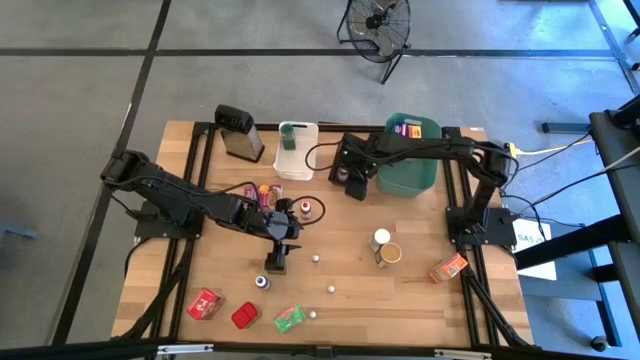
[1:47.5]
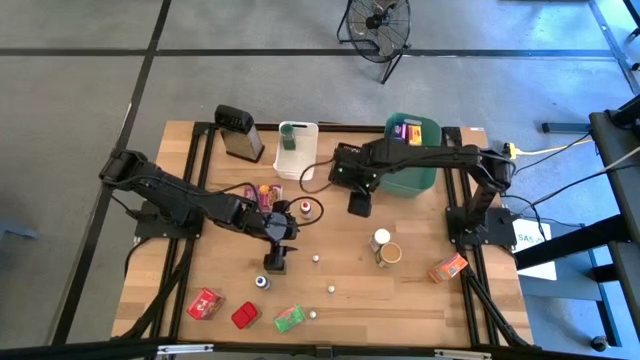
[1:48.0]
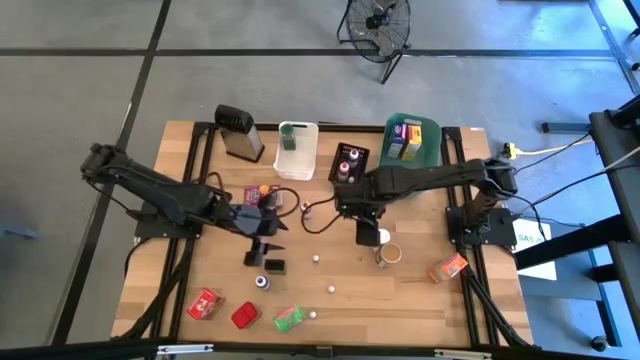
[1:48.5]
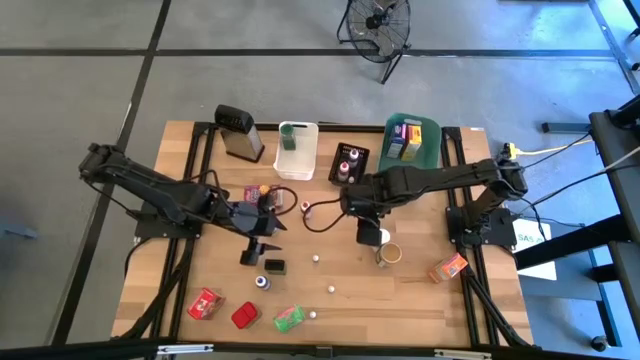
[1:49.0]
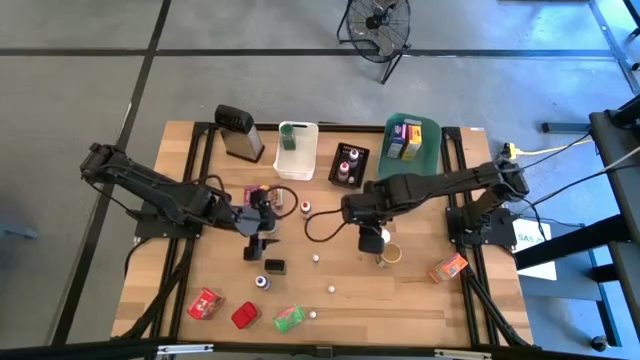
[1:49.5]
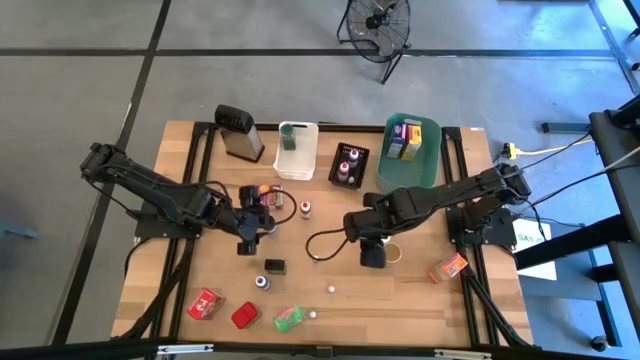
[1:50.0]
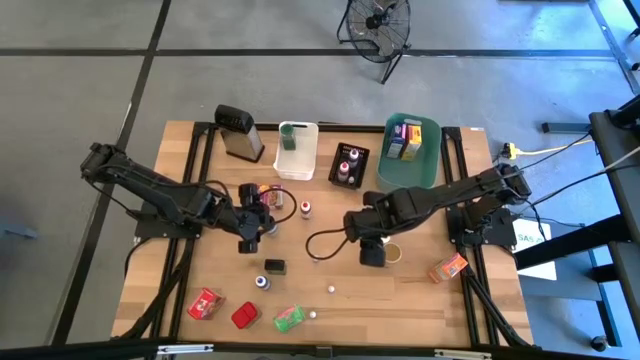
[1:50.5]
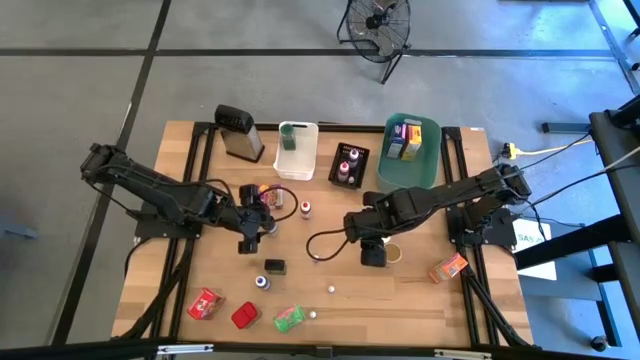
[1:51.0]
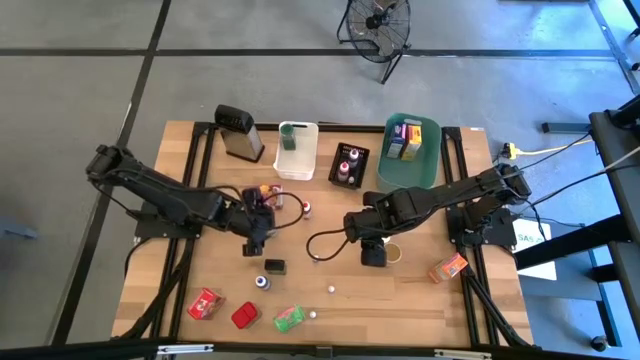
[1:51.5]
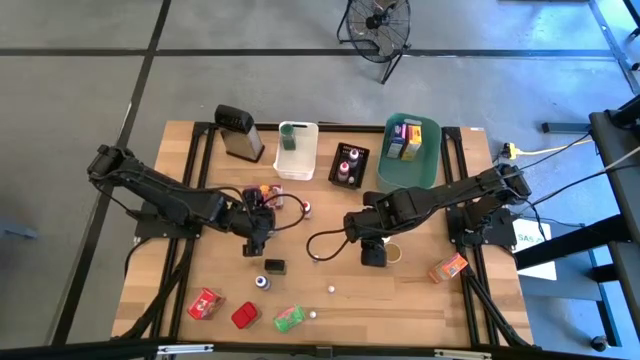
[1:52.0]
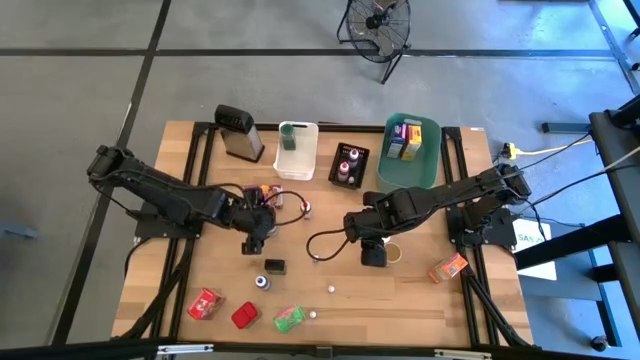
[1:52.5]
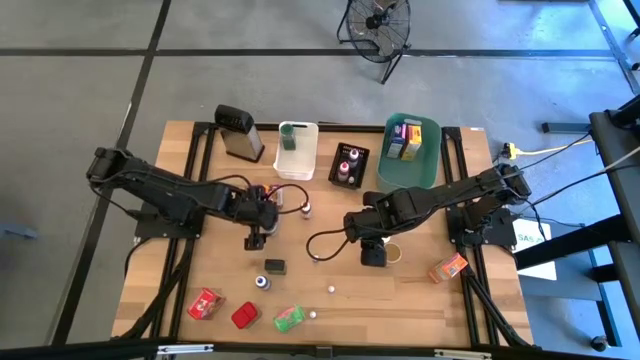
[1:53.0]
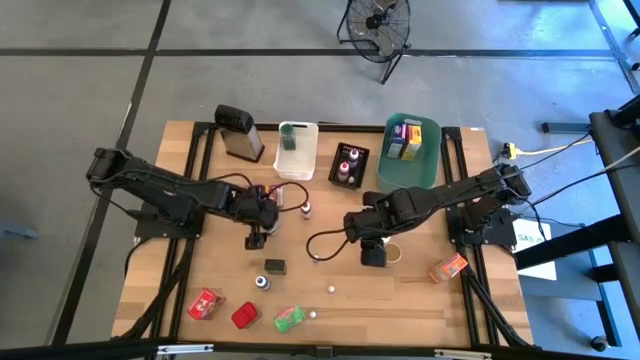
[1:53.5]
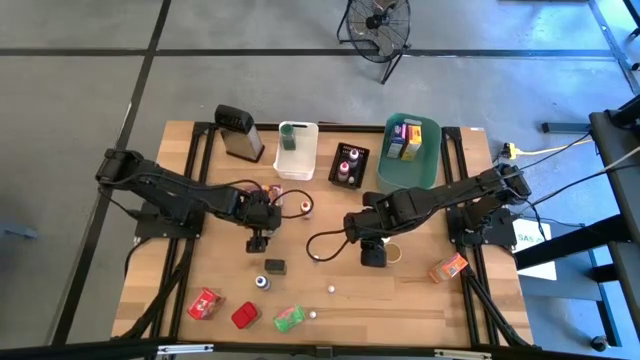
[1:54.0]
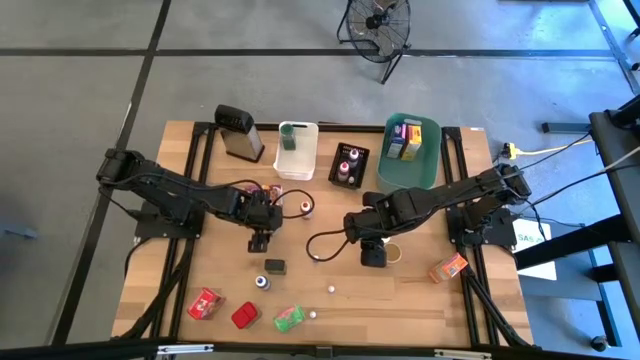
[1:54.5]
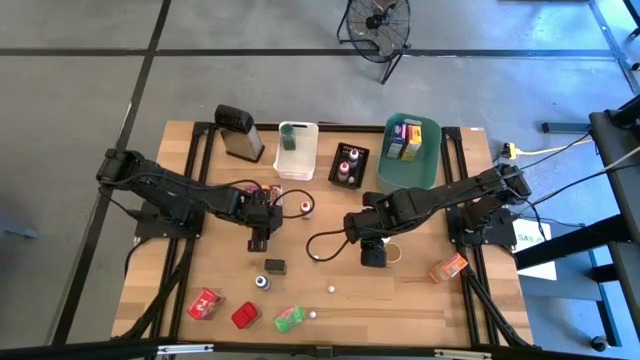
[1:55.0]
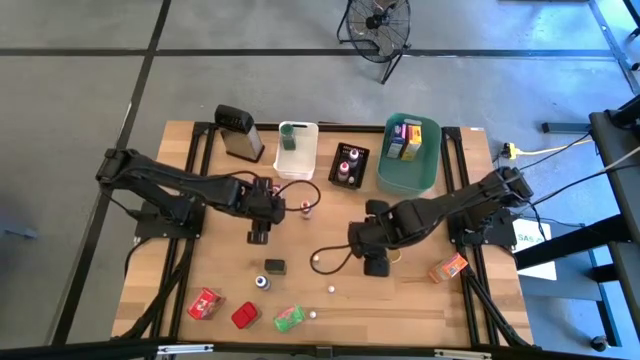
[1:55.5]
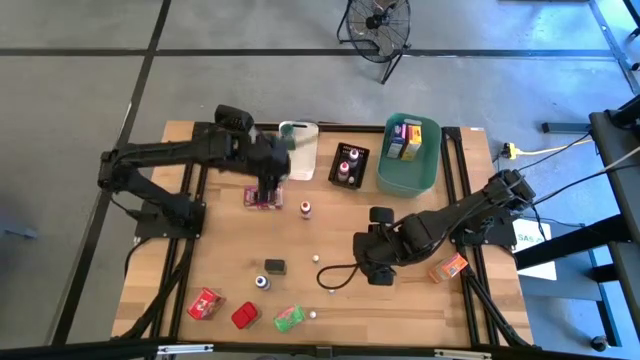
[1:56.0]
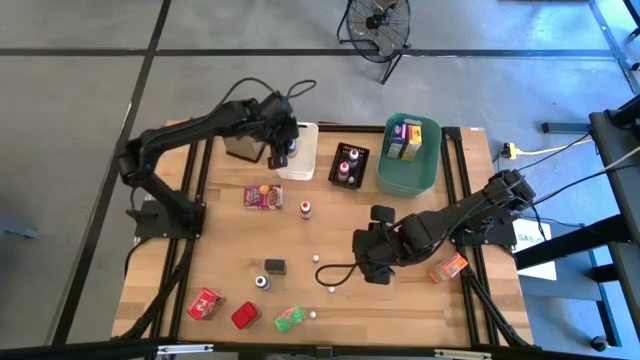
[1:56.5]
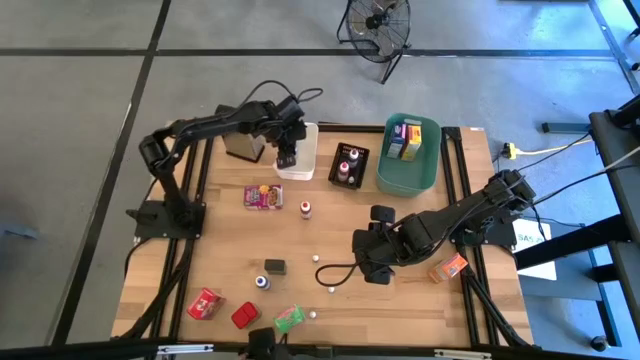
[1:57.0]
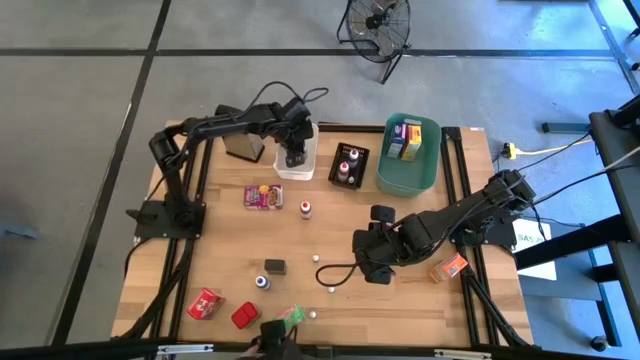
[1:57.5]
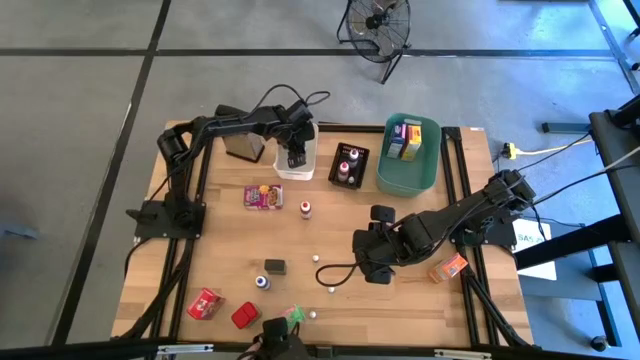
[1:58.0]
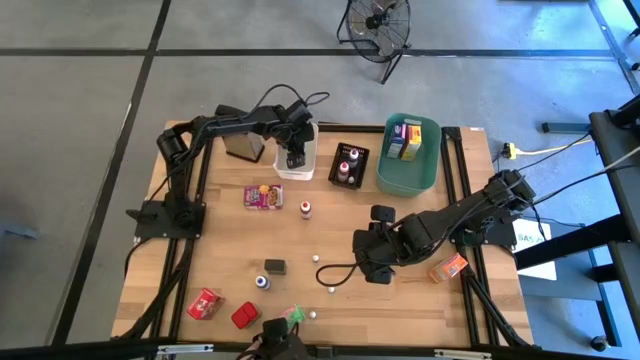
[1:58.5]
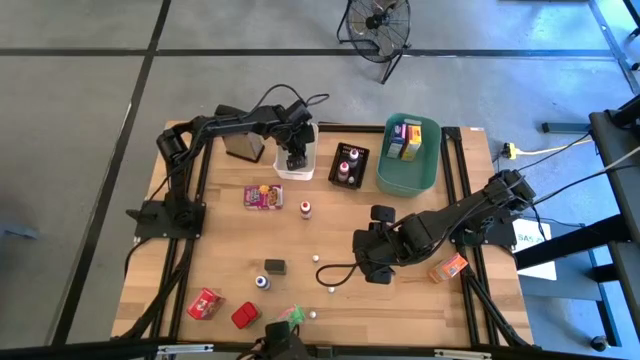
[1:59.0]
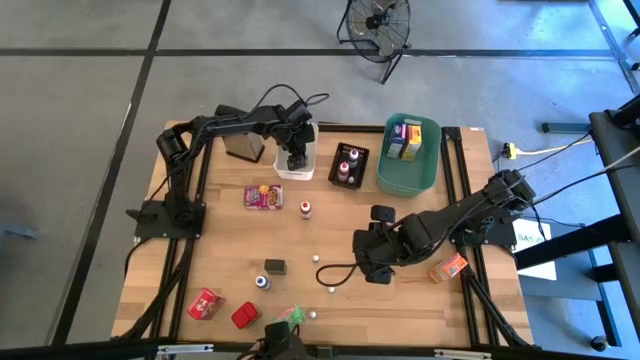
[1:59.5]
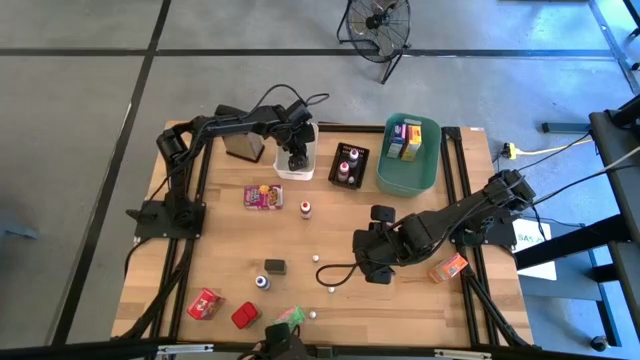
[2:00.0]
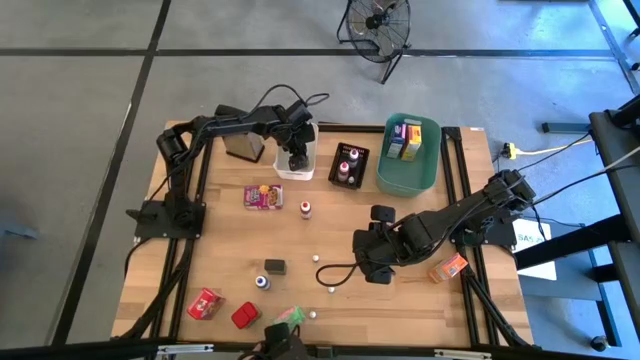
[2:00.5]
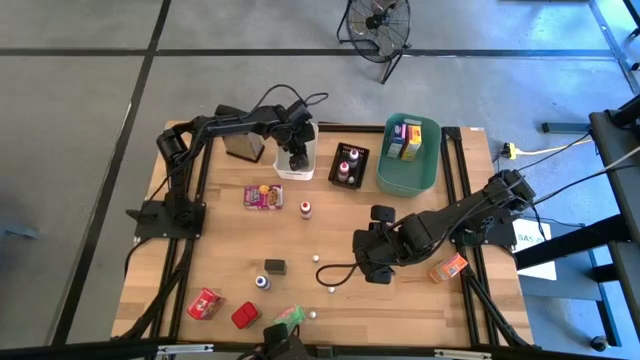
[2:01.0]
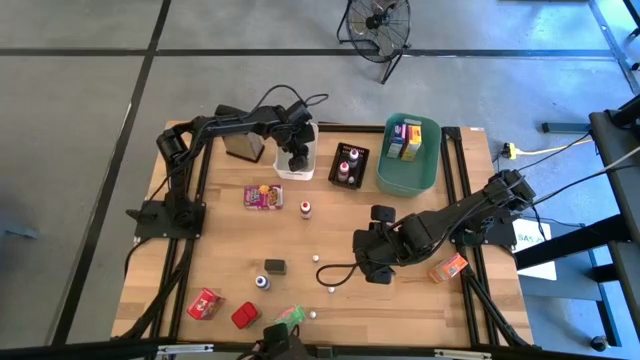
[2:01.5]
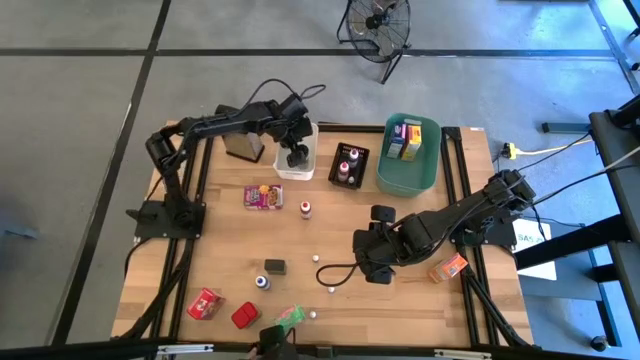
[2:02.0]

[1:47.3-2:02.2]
Task: Pick & Place Kitchen Items
Put the black seasoning bottle into the white bin

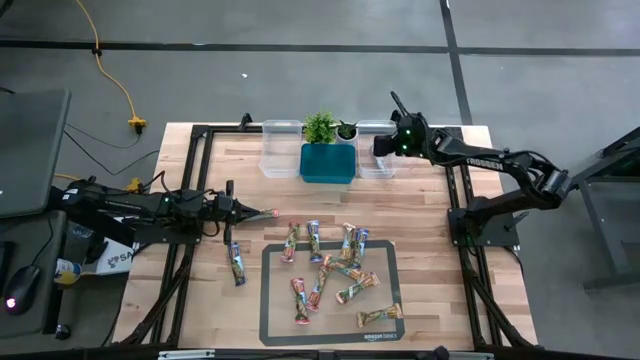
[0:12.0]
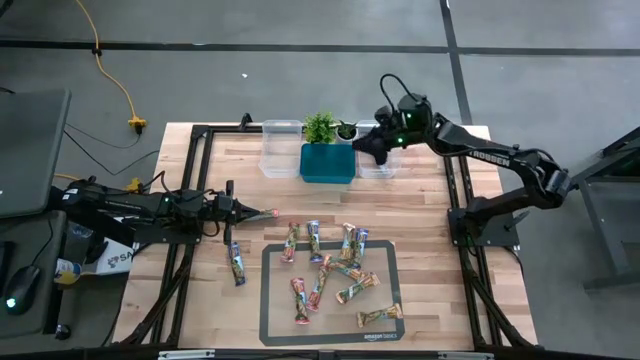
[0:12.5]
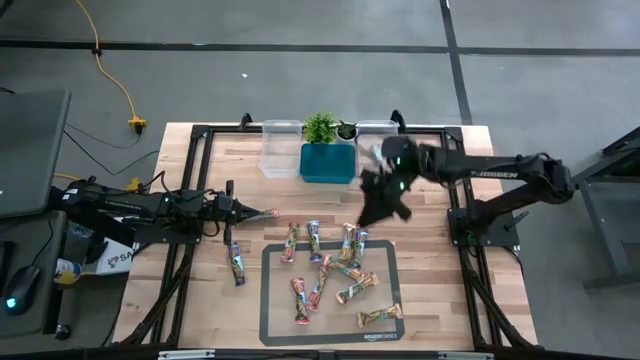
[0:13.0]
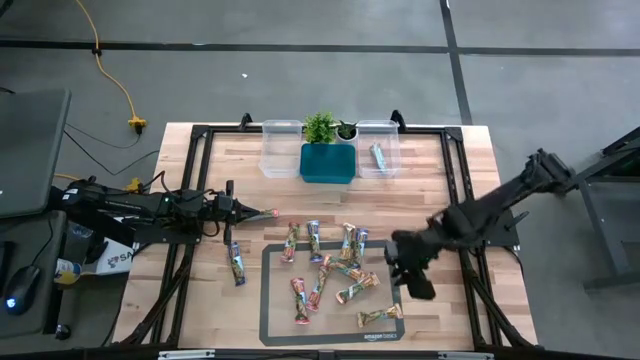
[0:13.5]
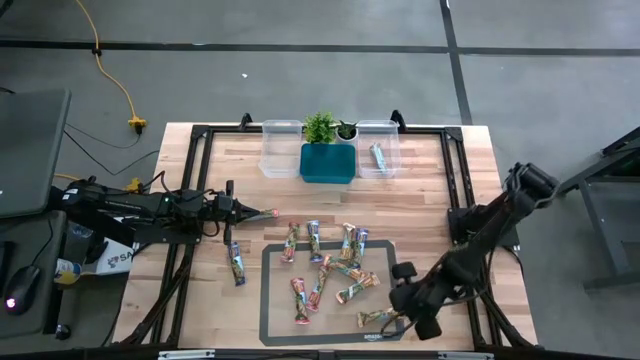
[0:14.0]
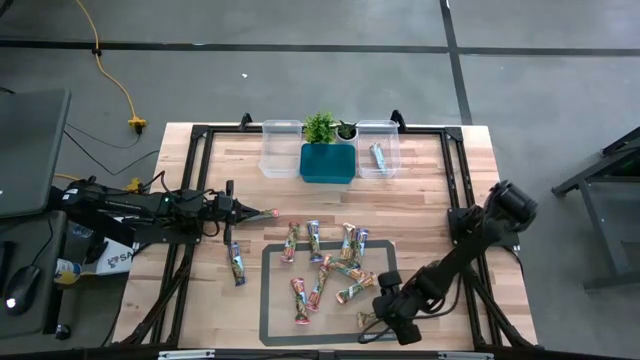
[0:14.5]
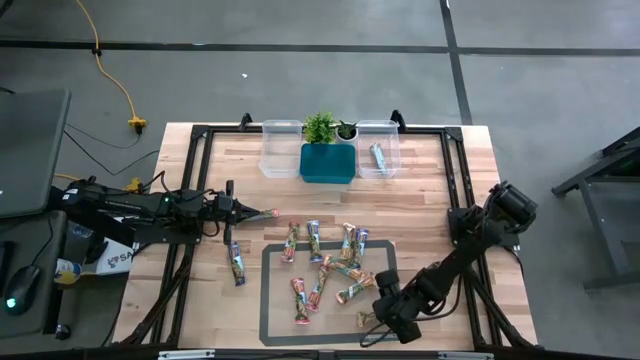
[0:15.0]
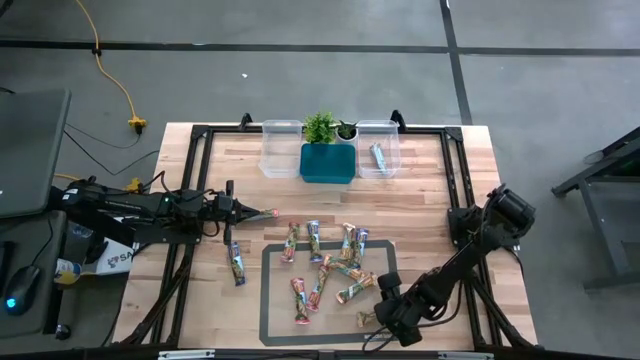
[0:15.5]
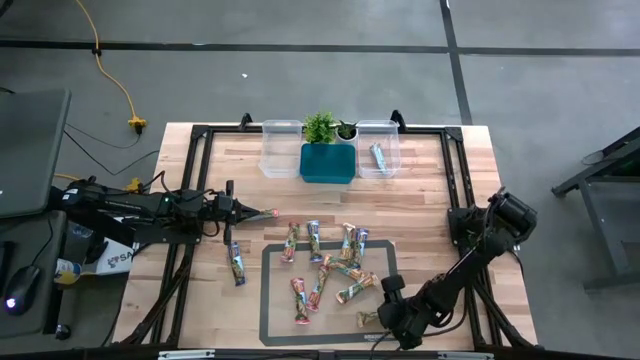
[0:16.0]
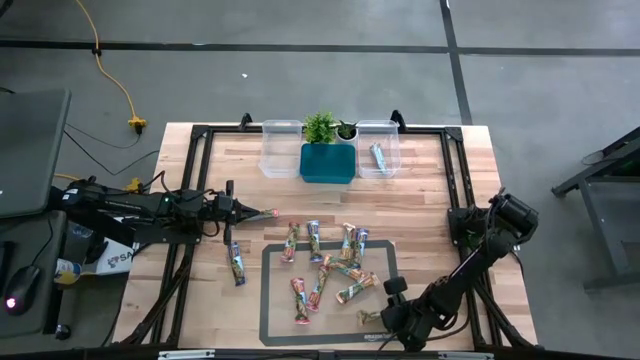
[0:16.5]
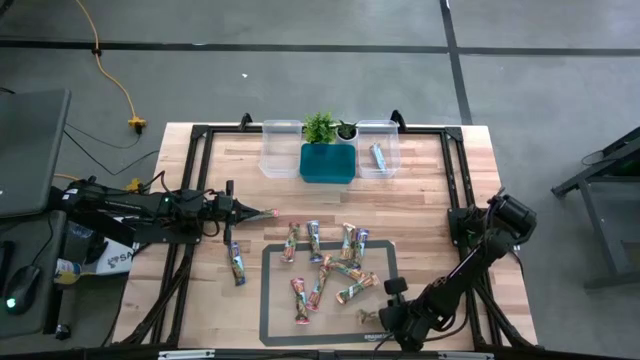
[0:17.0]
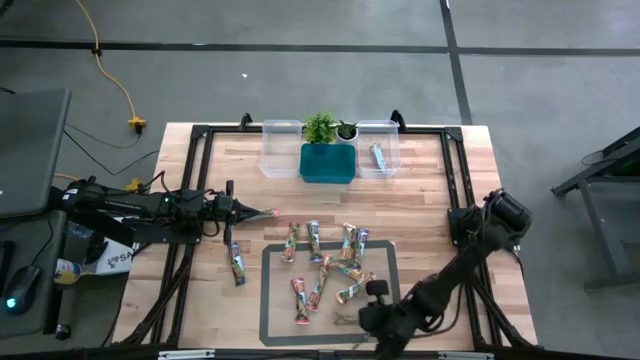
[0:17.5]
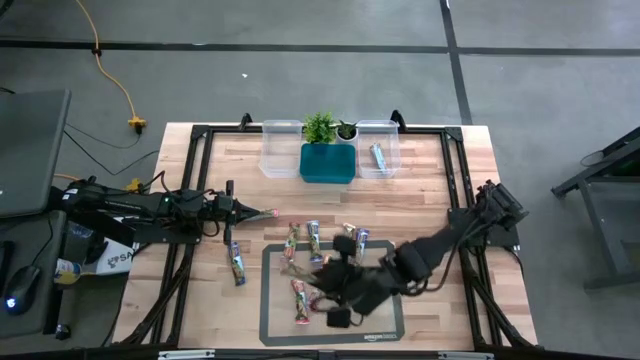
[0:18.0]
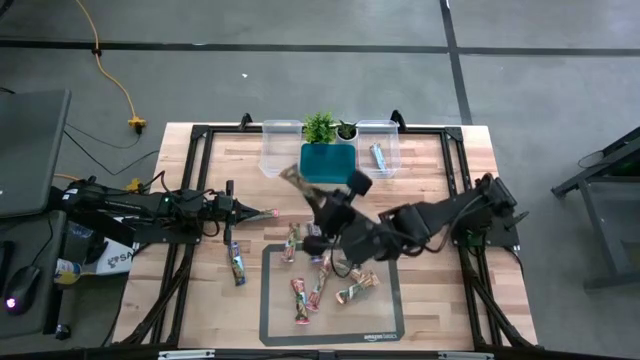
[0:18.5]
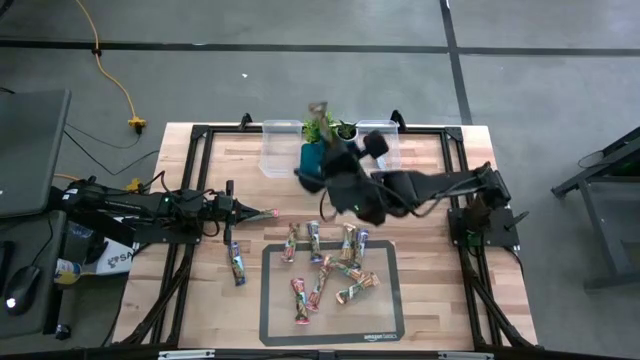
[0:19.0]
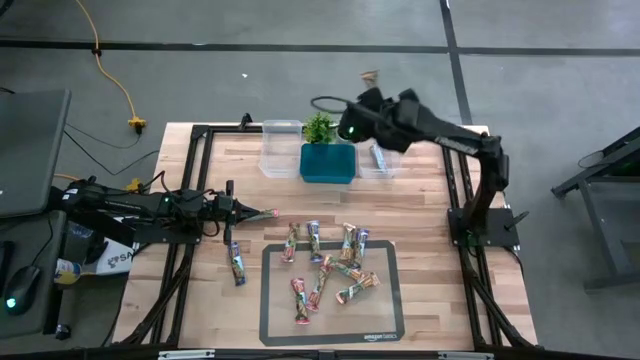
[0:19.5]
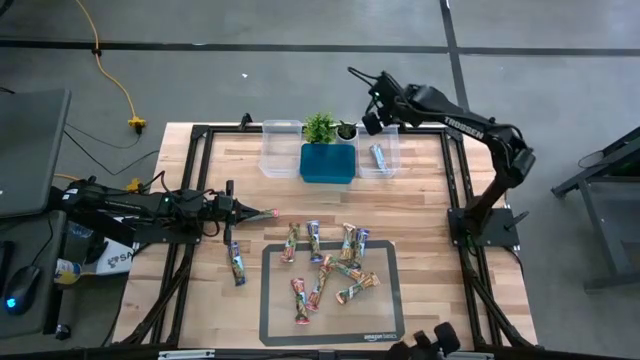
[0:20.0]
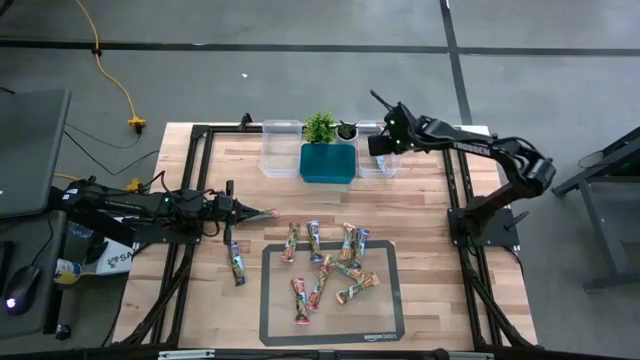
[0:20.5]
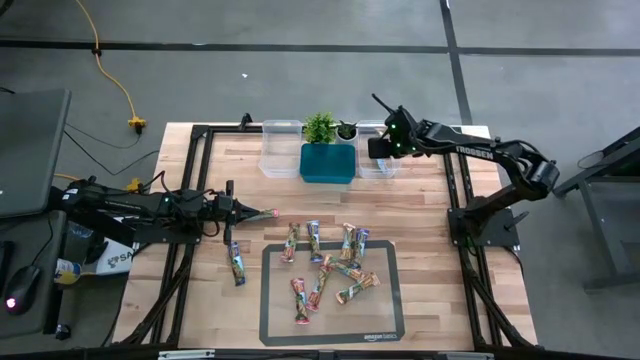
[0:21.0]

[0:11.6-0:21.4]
Task: Pick and place Granola Bars by type
Put the yellow granola bar into the right transparent bin
